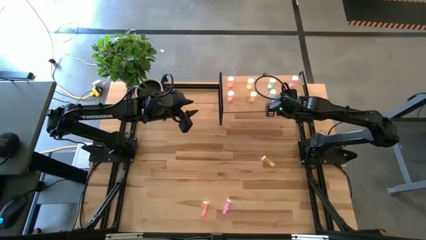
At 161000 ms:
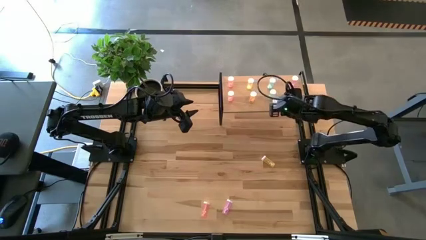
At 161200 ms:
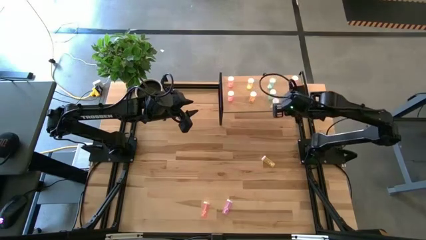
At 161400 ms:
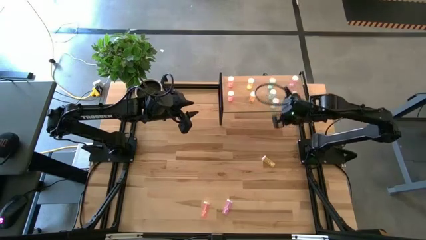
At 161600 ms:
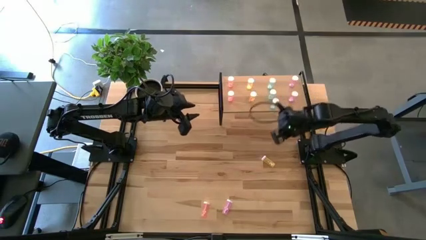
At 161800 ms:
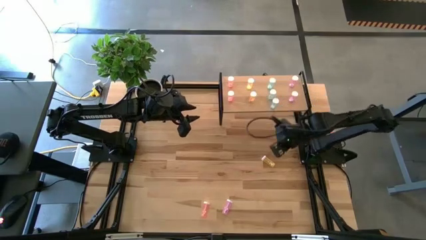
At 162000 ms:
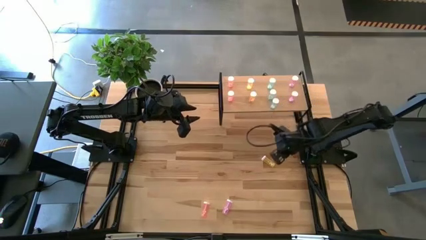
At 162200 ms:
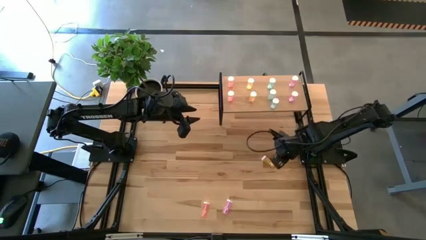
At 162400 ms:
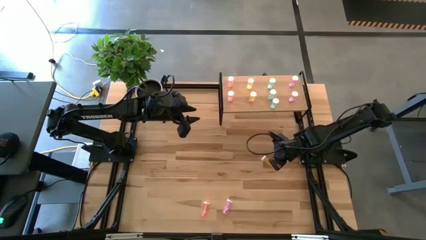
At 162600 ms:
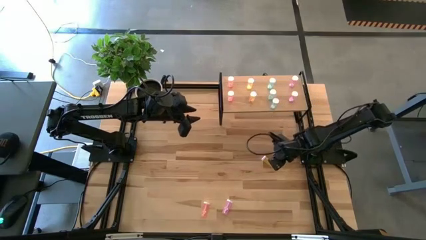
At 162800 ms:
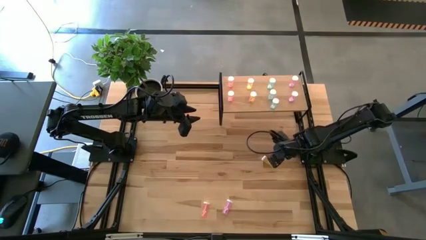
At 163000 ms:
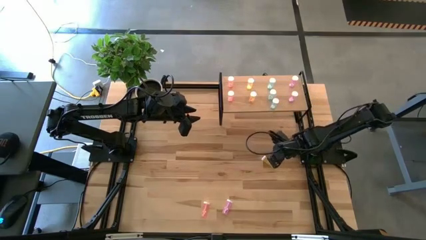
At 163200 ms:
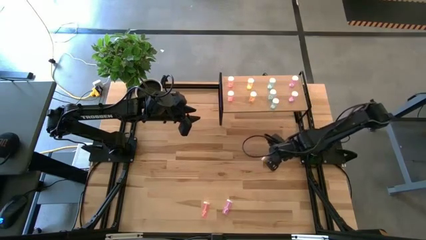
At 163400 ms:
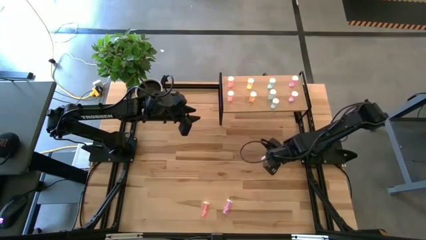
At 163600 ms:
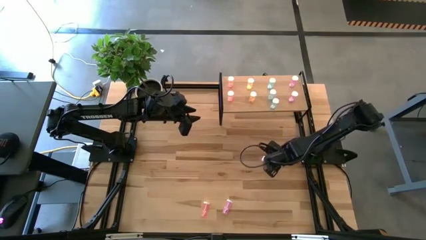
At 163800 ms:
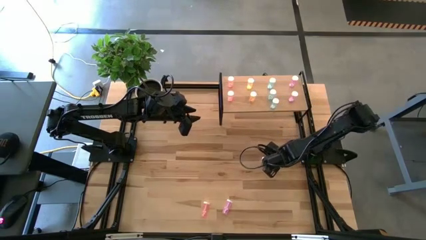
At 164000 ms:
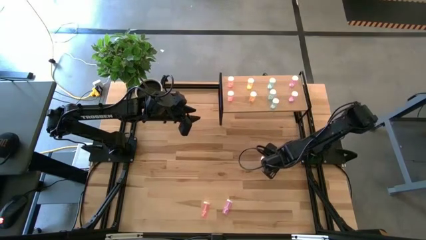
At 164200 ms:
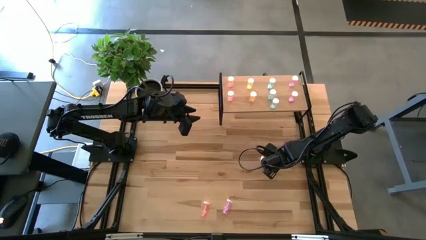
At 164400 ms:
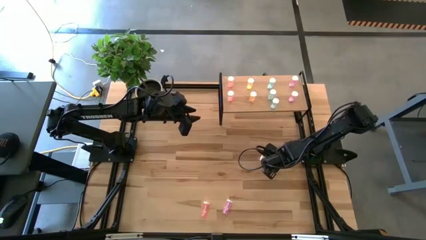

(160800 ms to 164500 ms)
Task: Pick and place medicine bottles onto shelf by color
Put the yellow pill bottle on the shelf aligned with the other yellow pill bottles

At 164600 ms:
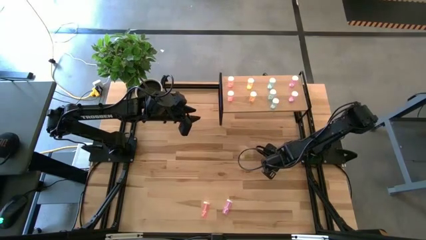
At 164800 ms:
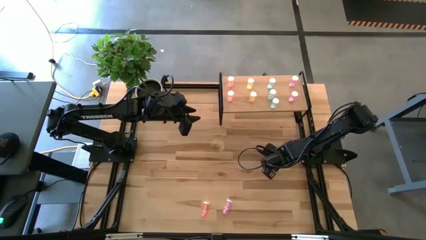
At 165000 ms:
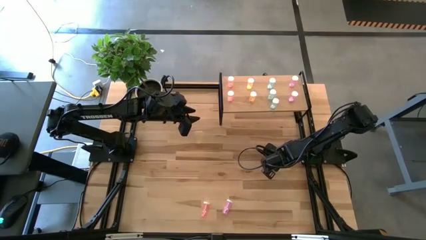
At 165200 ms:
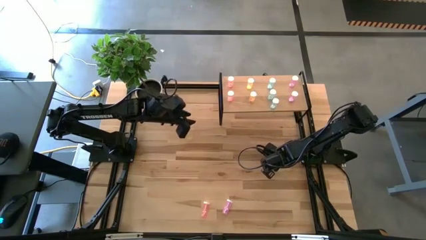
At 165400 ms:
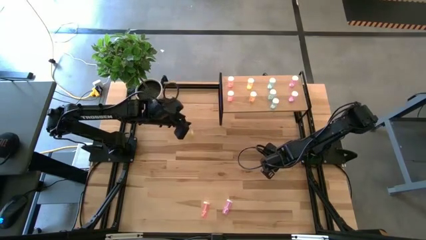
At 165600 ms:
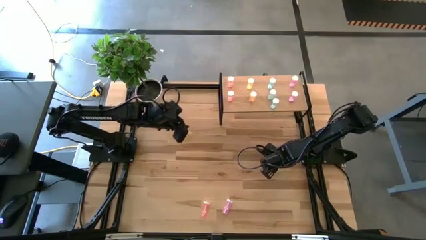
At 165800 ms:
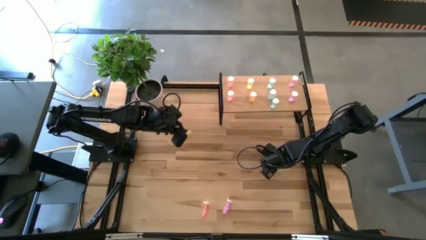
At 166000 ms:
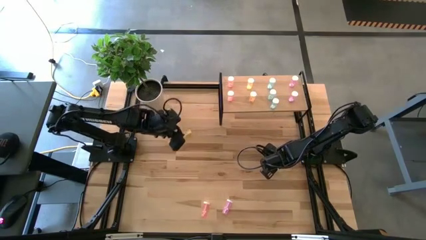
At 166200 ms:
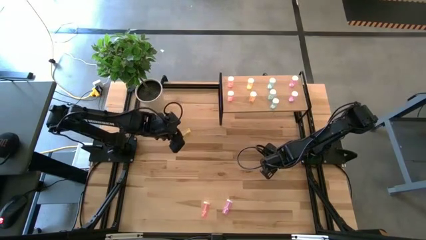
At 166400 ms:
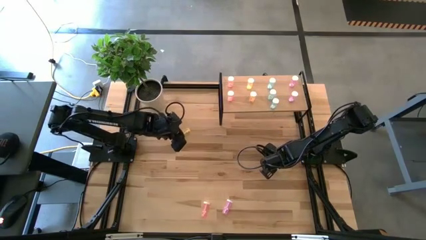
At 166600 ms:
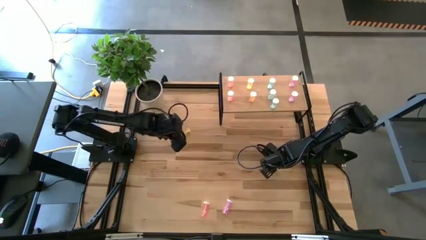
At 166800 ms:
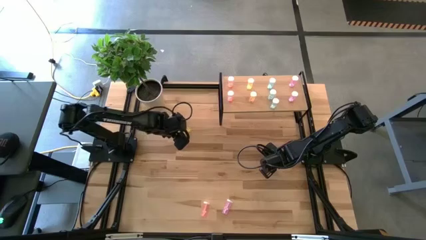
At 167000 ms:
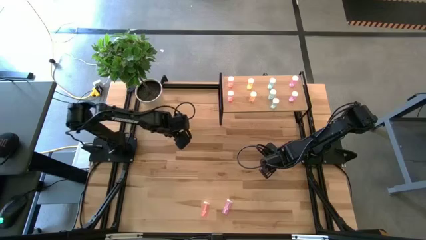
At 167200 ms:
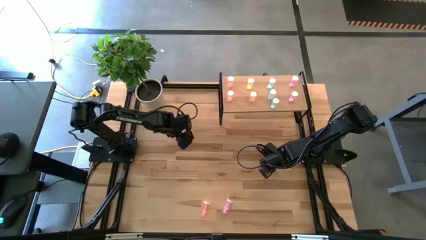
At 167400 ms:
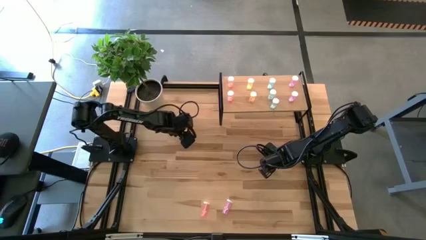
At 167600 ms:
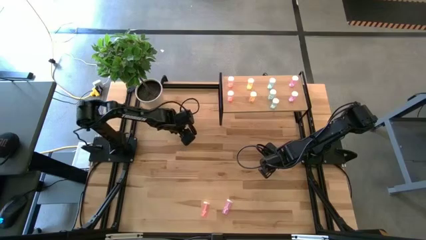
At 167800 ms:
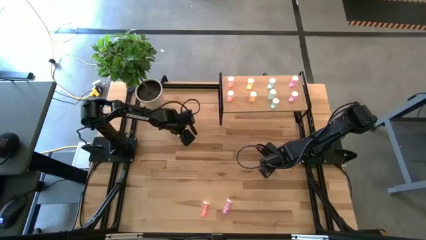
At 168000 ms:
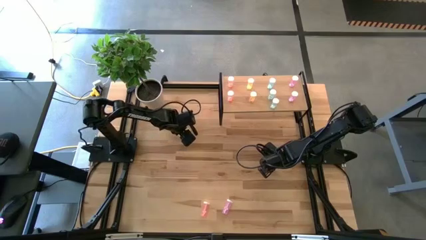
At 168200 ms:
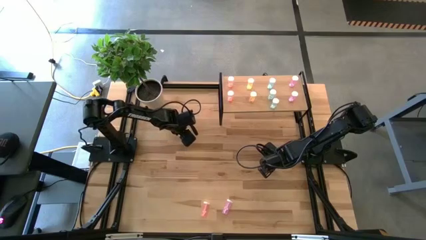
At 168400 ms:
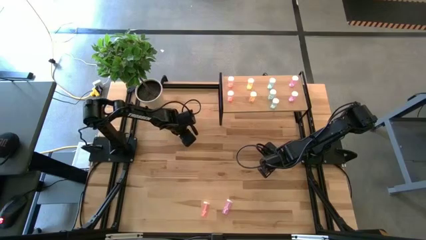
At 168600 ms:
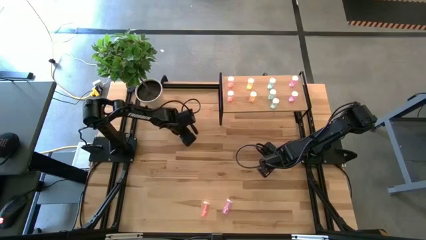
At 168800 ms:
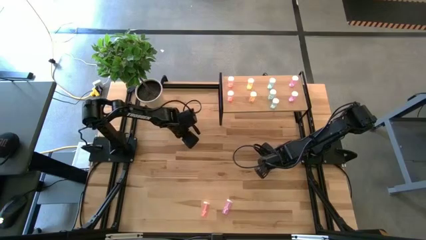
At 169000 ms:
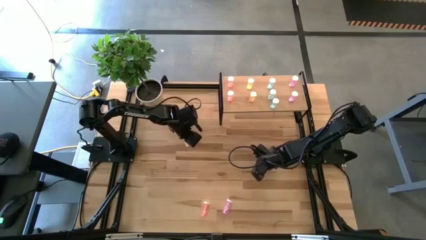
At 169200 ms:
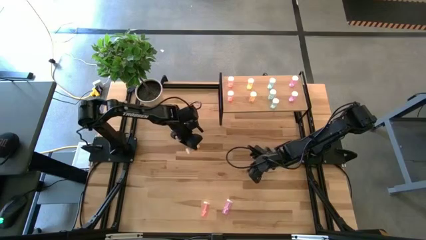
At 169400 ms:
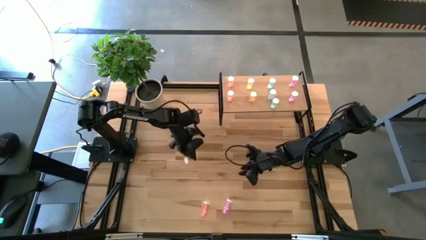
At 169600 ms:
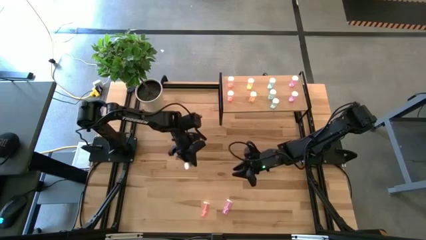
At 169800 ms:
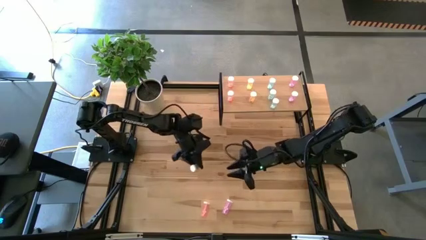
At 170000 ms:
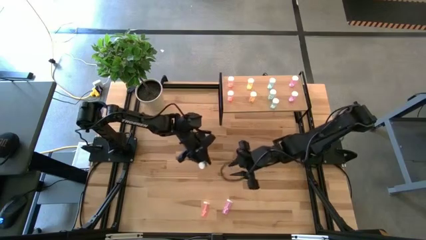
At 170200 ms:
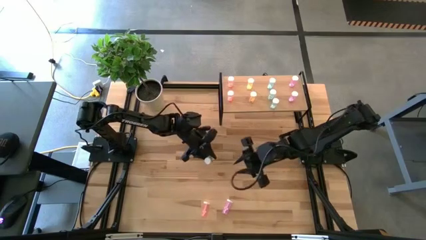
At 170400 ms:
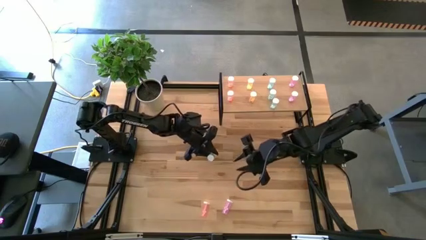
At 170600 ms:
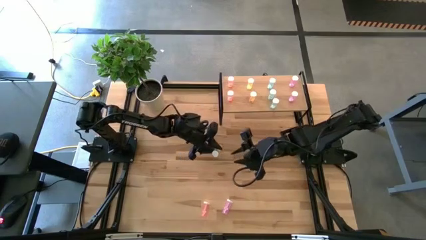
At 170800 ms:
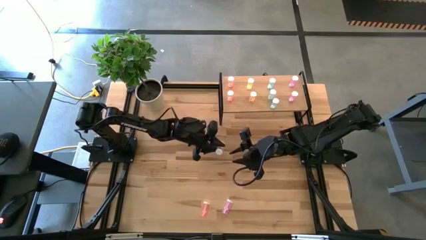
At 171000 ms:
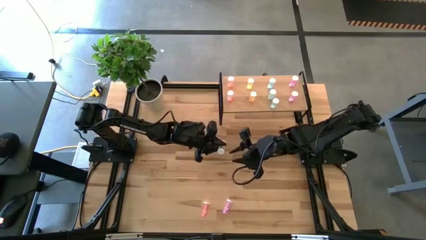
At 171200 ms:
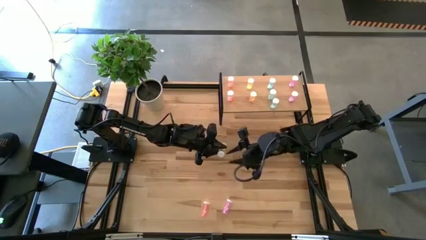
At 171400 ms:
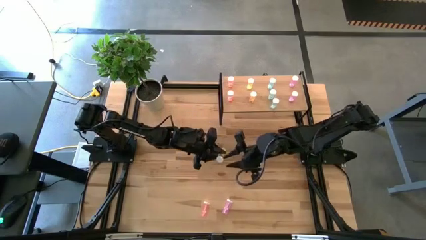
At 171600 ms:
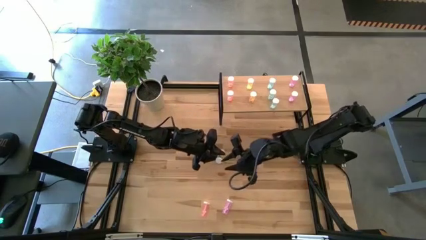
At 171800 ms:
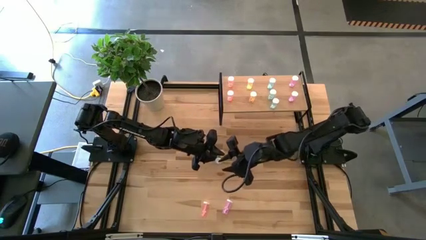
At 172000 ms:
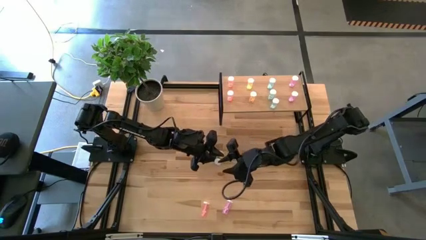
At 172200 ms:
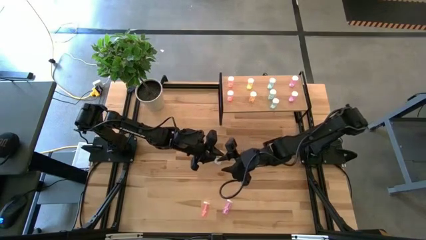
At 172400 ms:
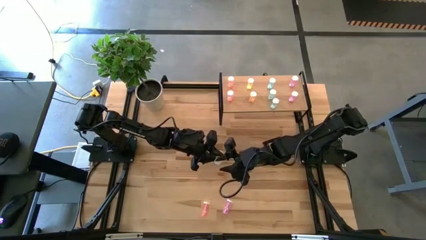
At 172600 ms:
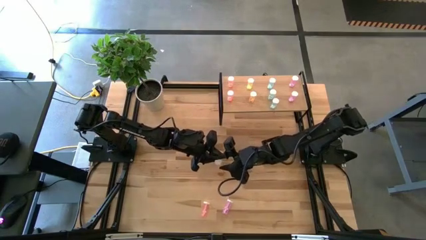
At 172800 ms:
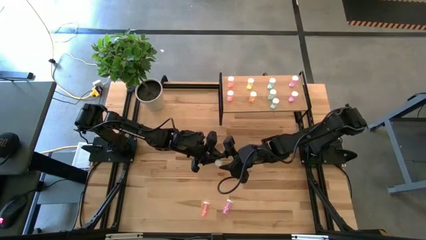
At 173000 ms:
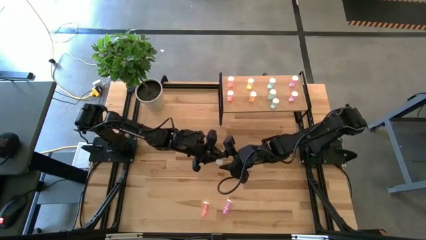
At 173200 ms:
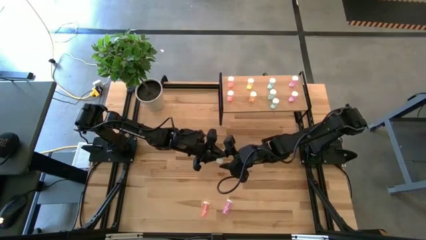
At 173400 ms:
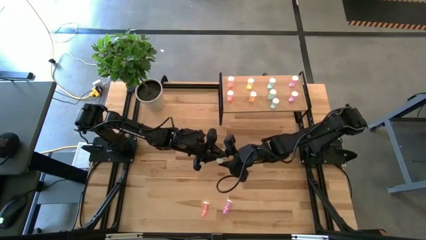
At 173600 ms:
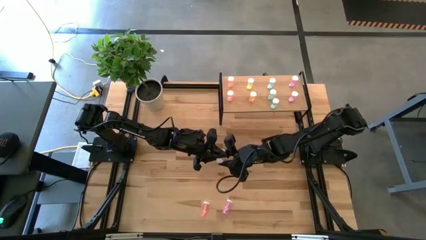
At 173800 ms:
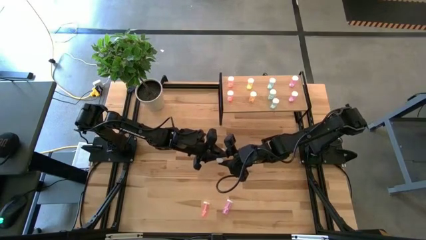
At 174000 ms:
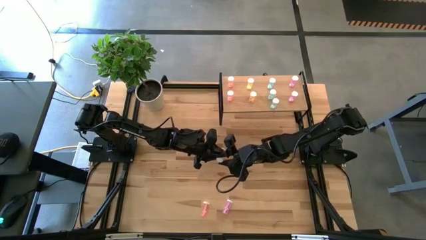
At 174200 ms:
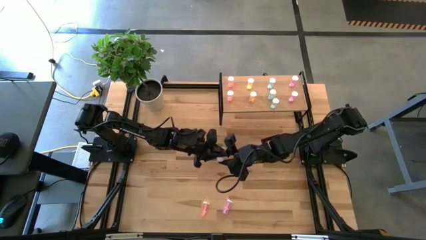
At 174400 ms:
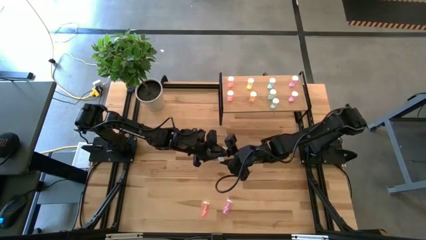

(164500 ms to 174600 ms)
Put the yellow pill bottle on the shelf aligned with the other yellow pill bottles

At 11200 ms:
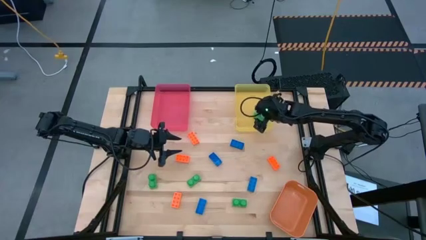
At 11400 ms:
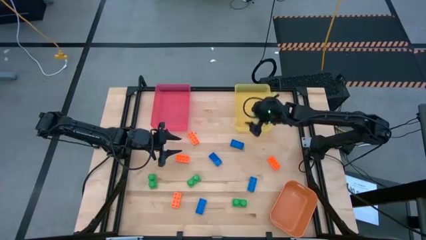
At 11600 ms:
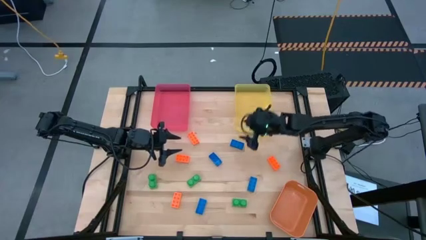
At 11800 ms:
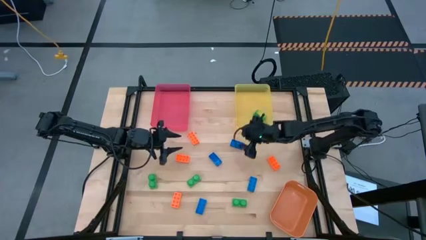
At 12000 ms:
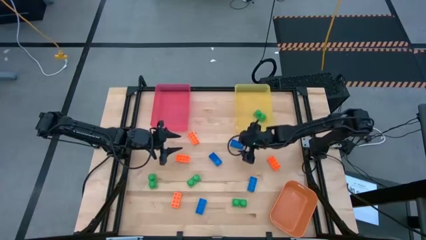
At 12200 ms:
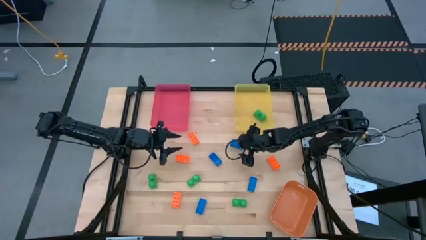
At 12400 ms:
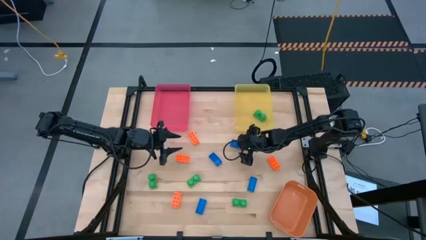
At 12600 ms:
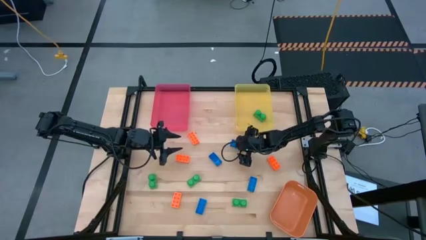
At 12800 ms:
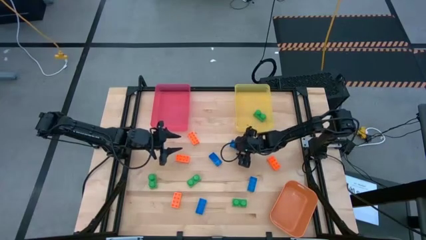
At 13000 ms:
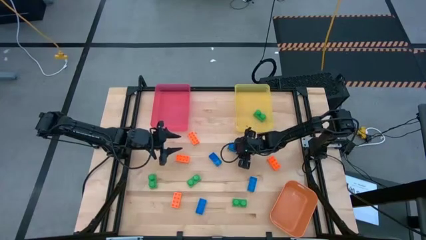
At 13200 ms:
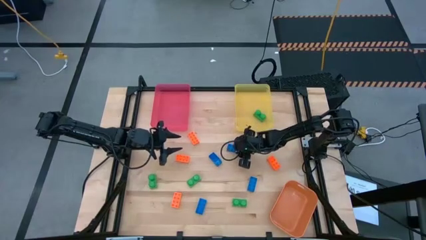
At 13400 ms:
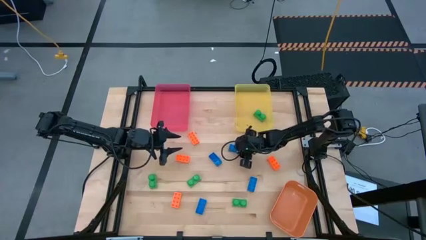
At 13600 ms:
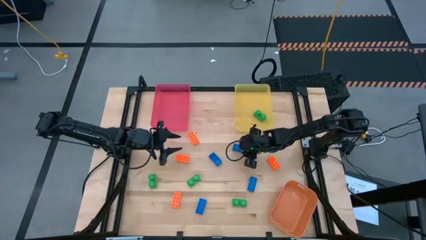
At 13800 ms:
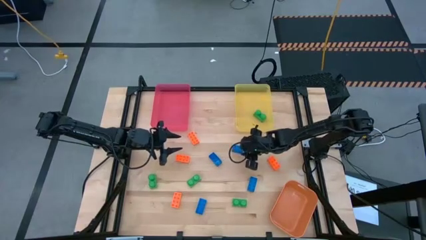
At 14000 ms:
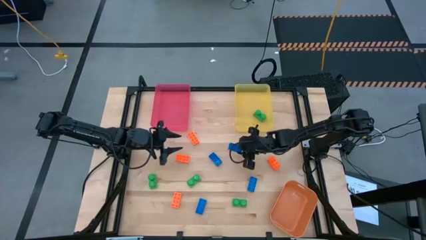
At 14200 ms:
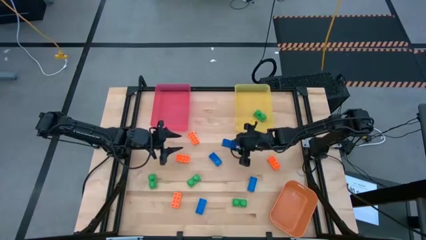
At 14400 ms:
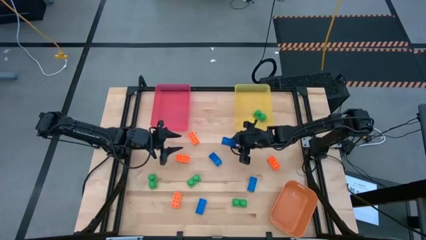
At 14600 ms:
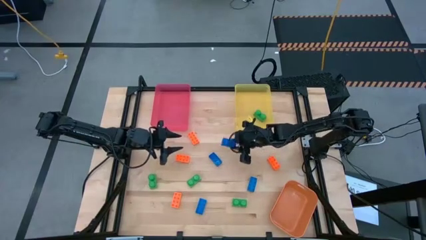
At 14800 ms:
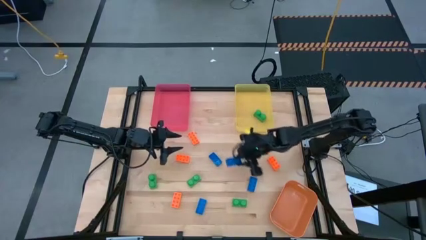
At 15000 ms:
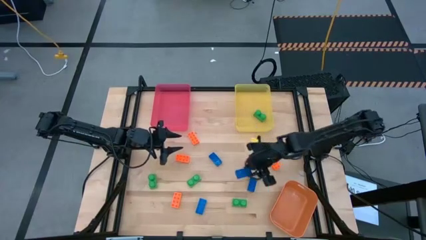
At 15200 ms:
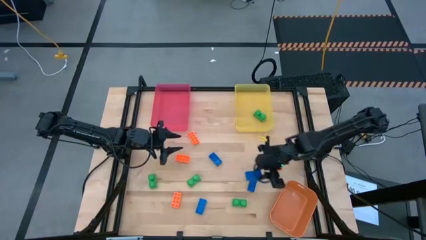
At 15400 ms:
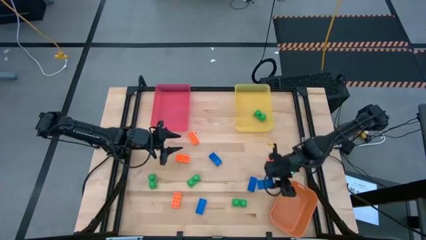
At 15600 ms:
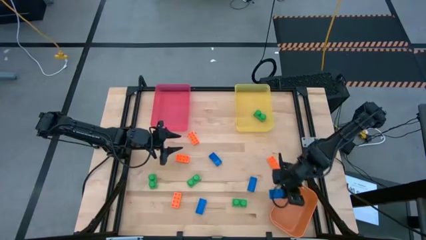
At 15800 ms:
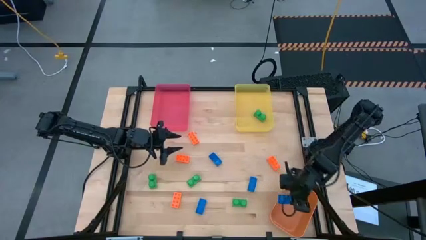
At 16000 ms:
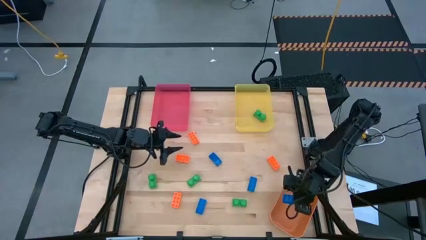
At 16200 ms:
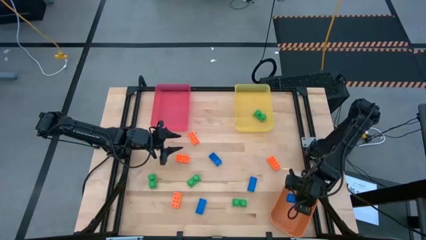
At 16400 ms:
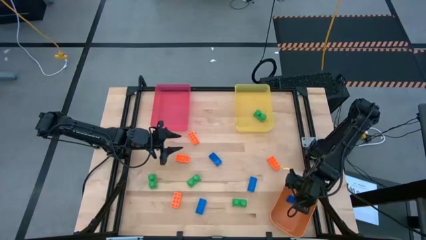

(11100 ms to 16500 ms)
Task: Sort & place blocks by color
Put the top right blue game piece into the orange bin
